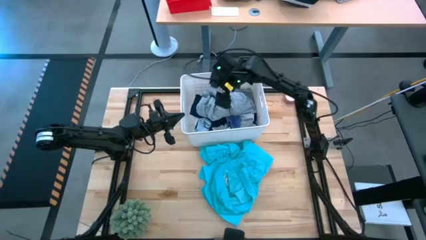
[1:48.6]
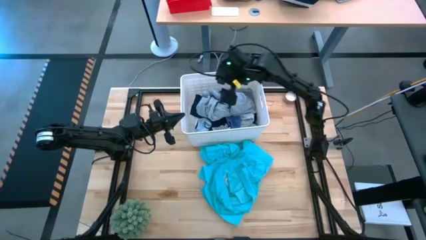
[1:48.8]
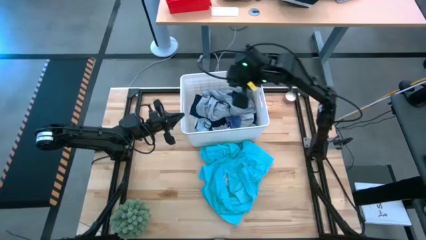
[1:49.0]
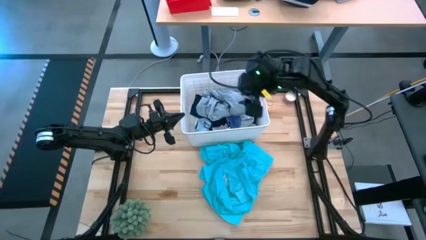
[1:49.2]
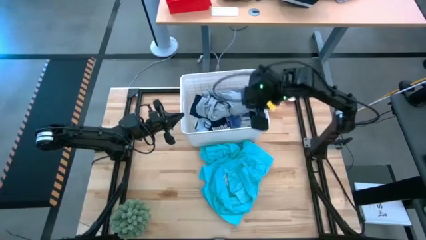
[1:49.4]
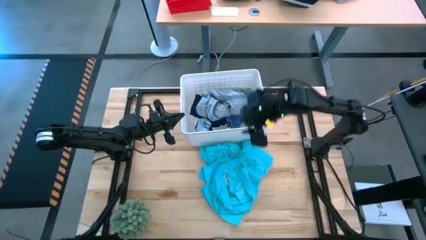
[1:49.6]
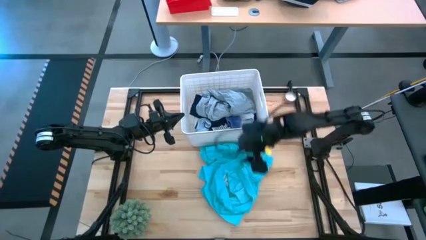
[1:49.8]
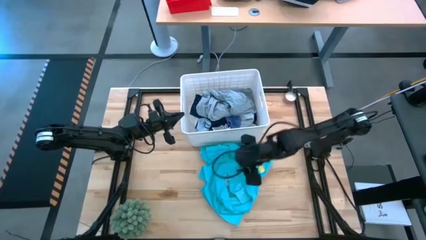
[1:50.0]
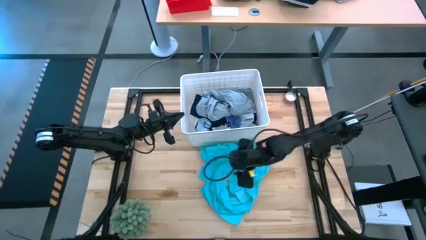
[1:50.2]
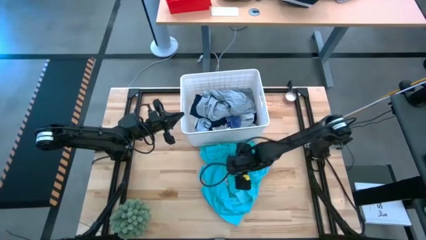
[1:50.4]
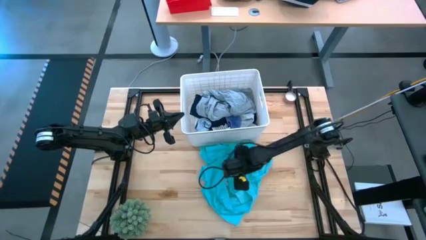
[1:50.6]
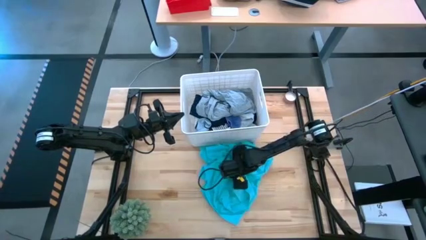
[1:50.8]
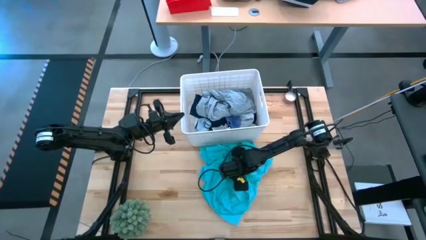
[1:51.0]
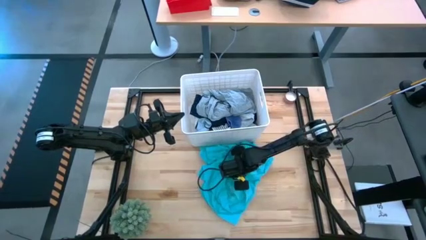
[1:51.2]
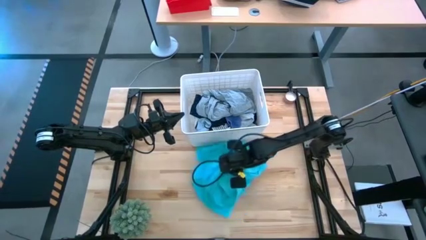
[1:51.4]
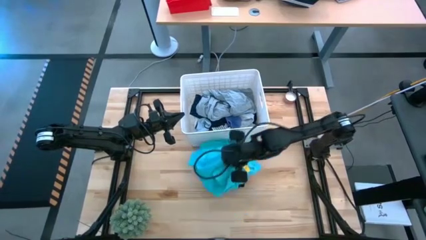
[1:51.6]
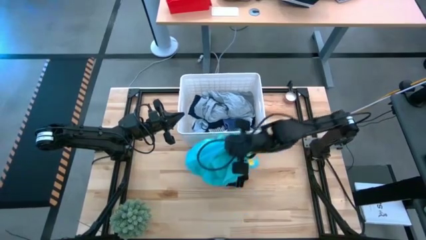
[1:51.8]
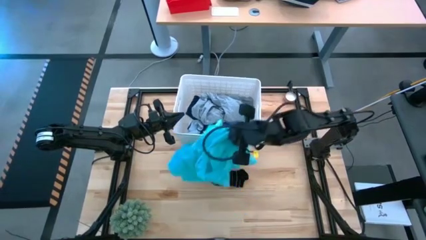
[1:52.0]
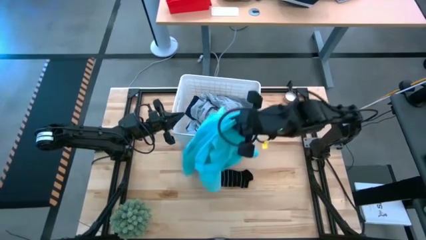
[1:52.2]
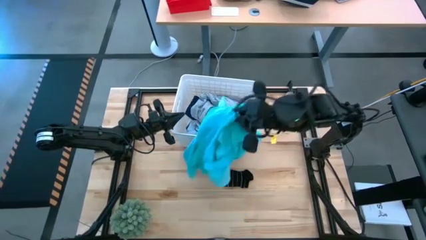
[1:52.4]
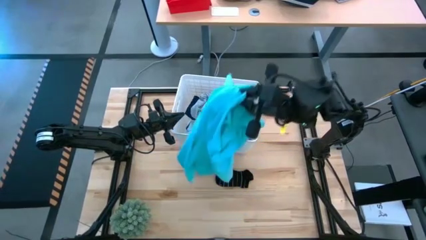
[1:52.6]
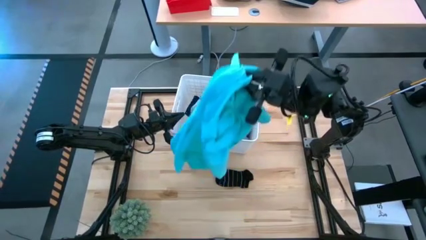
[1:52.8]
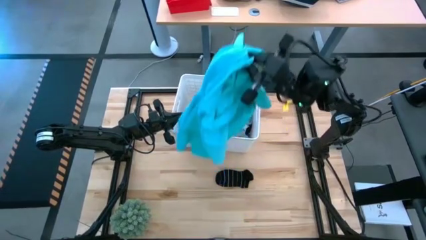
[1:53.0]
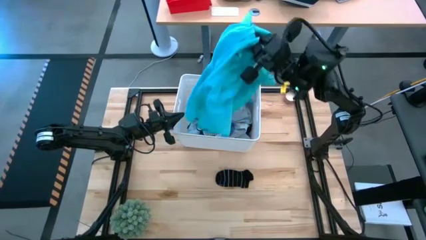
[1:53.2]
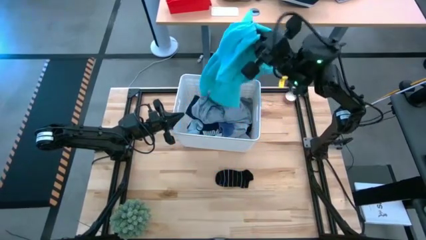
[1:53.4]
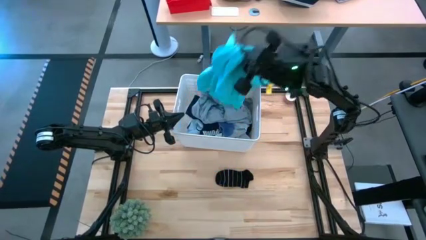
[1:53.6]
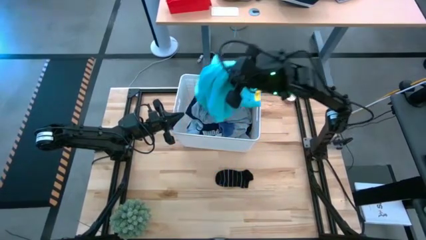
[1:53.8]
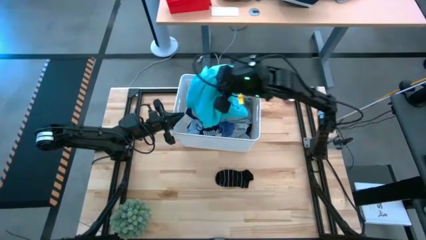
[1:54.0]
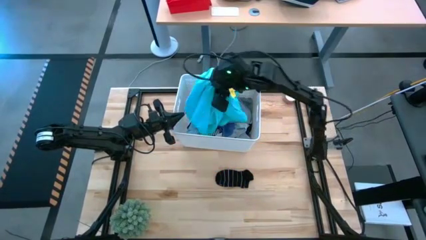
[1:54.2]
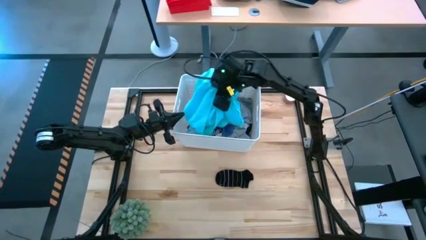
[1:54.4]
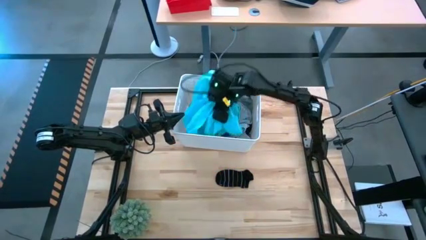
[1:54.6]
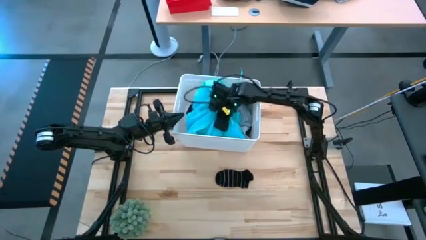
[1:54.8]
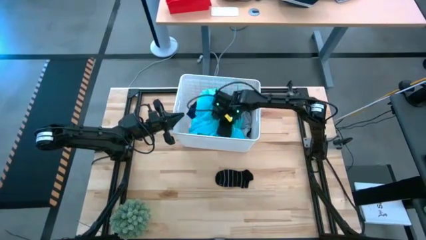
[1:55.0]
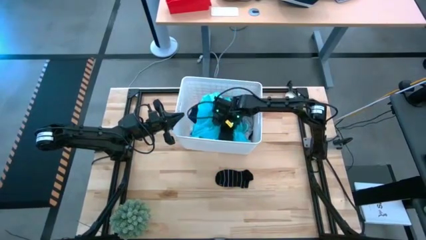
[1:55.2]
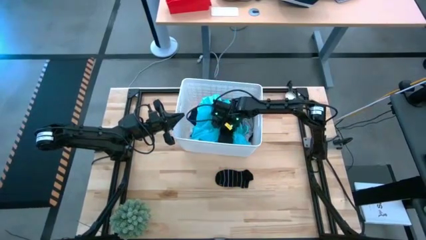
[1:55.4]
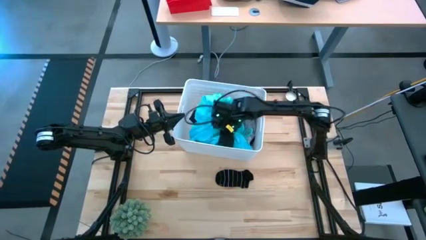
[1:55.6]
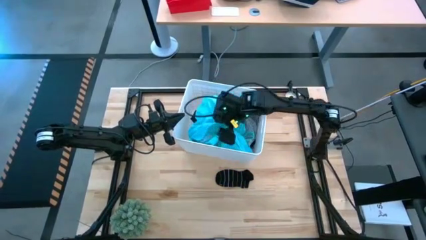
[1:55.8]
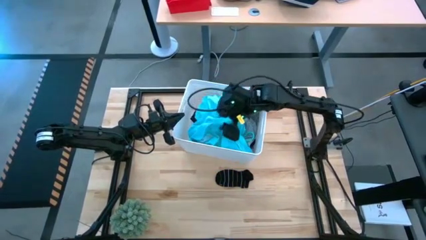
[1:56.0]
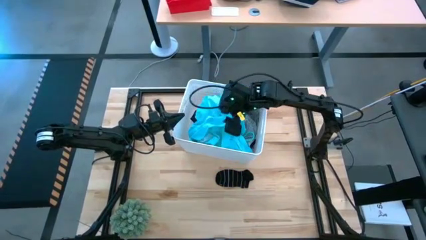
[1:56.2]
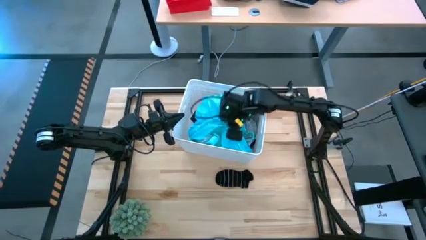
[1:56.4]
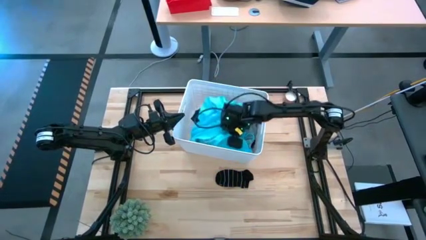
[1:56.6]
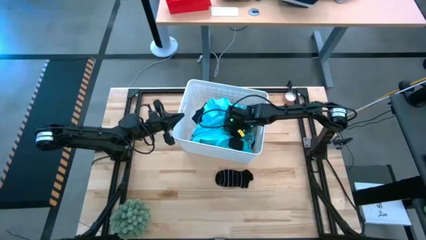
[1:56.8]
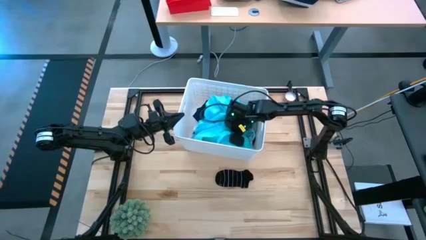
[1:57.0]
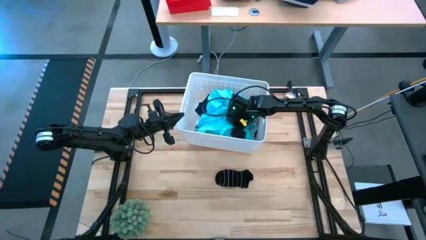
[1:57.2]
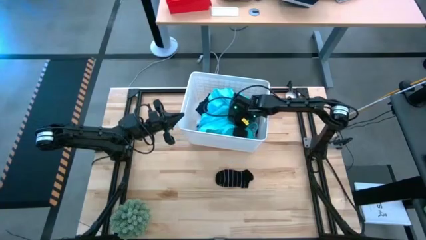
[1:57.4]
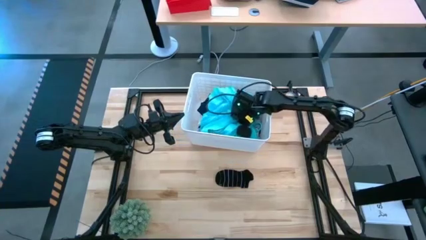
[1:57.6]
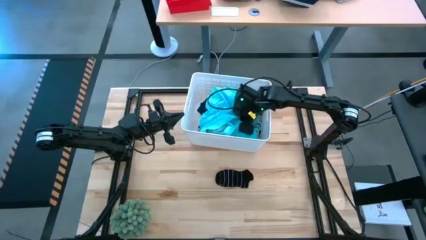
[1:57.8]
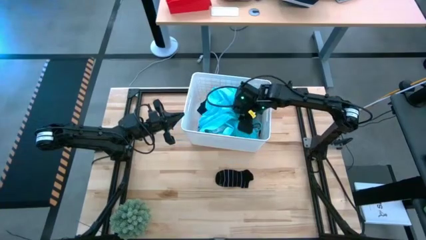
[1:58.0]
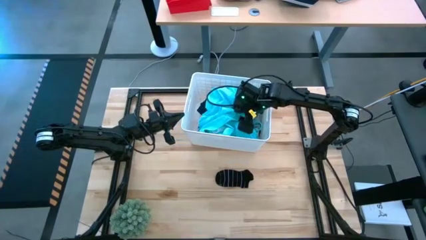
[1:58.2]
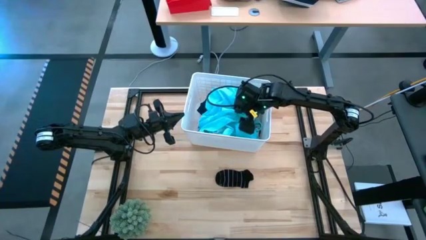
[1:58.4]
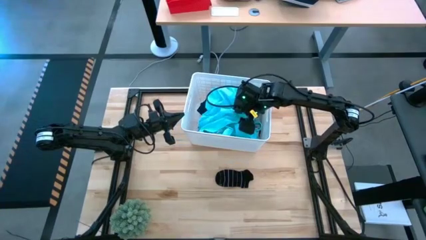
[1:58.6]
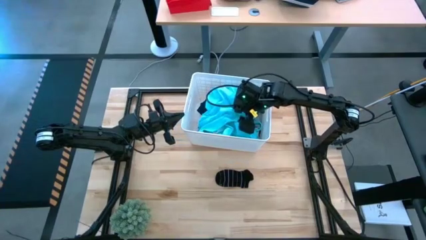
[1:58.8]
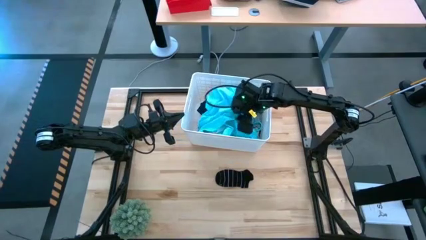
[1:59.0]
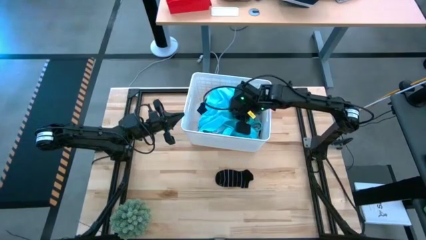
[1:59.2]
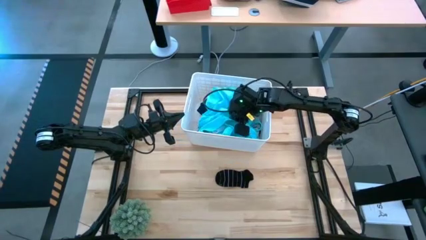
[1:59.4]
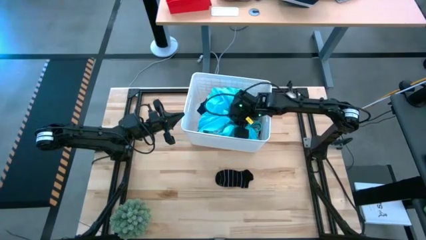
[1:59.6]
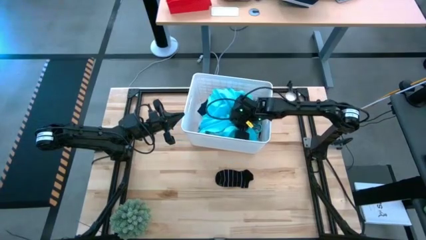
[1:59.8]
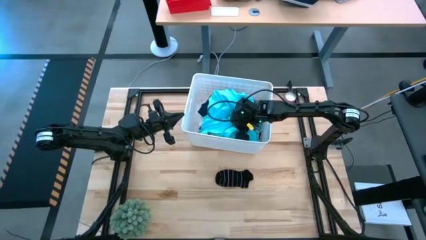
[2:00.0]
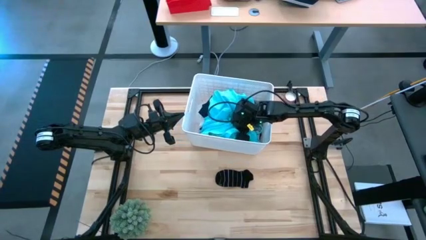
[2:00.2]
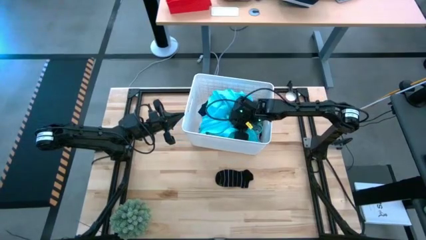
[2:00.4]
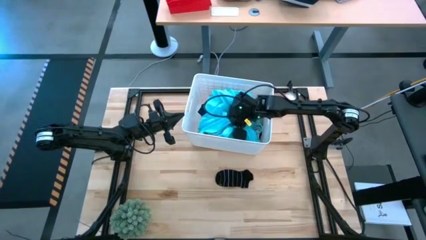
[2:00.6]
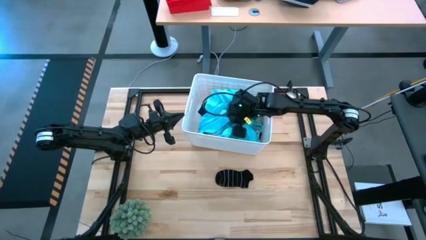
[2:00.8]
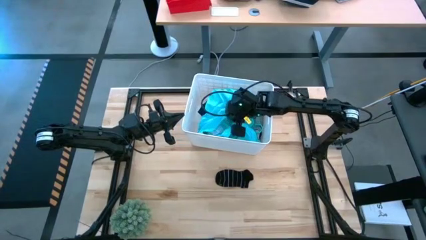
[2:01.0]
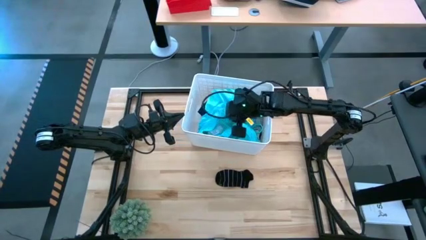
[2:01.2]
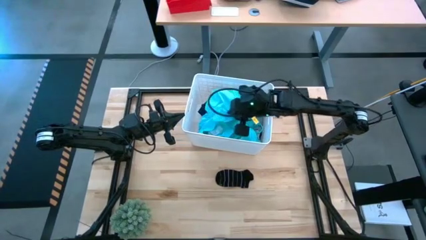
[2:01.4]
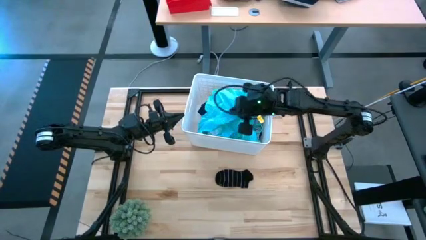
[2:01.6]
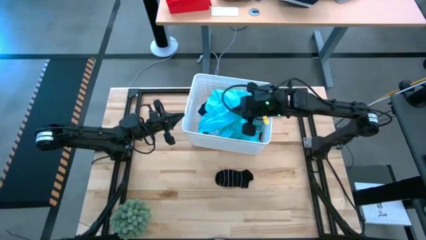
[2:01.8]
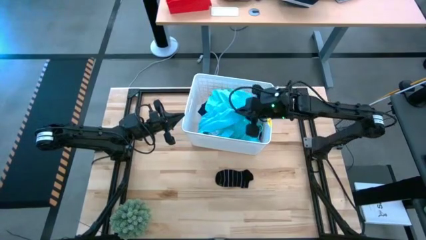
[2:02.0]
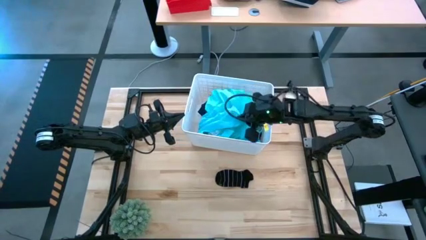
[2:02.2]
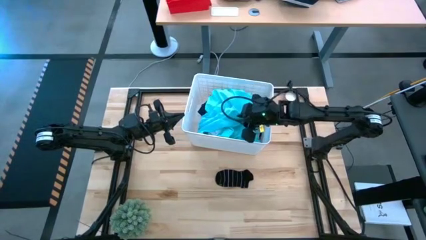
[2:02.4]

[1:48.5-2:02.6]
Task: Sort clothes
Put the green polo shirt into the white bin
